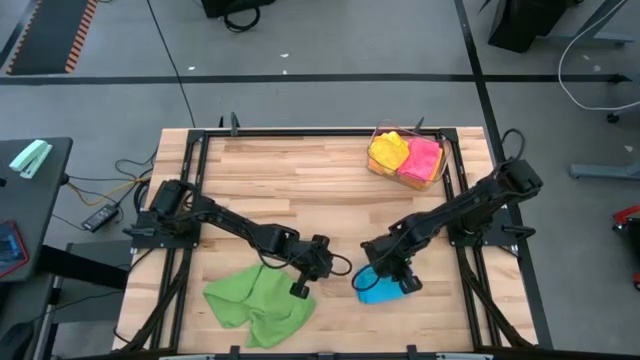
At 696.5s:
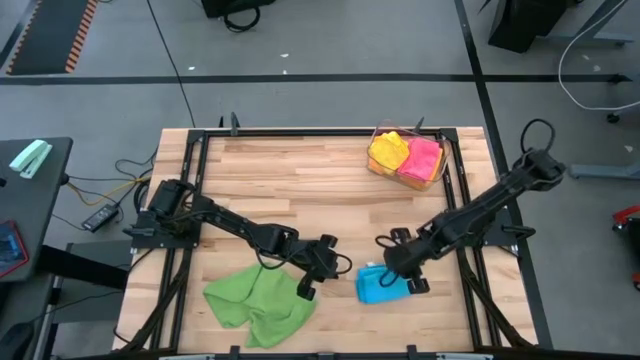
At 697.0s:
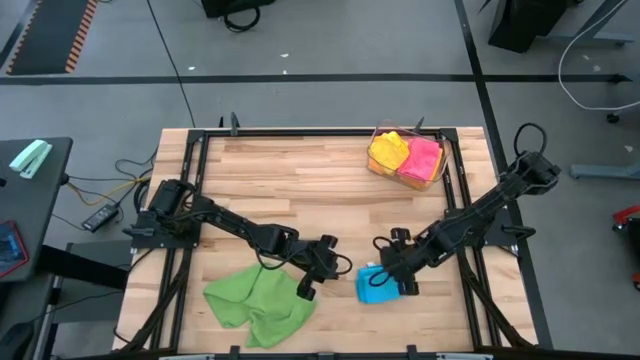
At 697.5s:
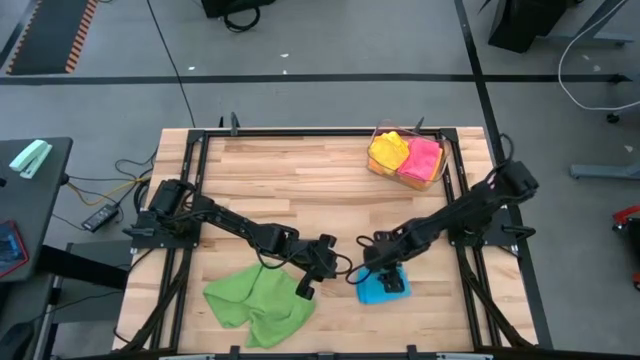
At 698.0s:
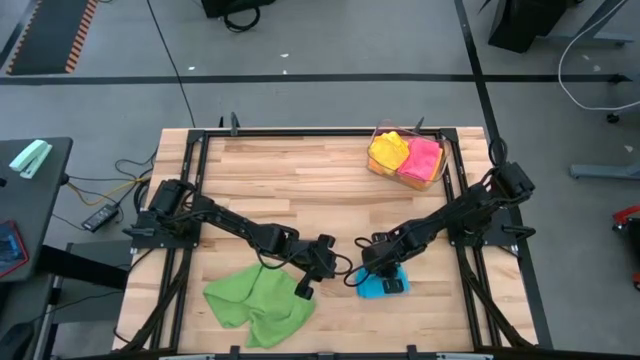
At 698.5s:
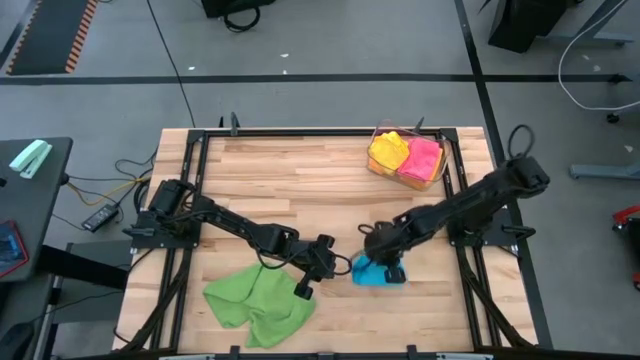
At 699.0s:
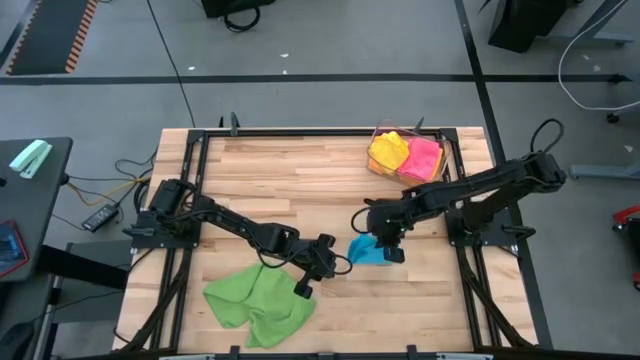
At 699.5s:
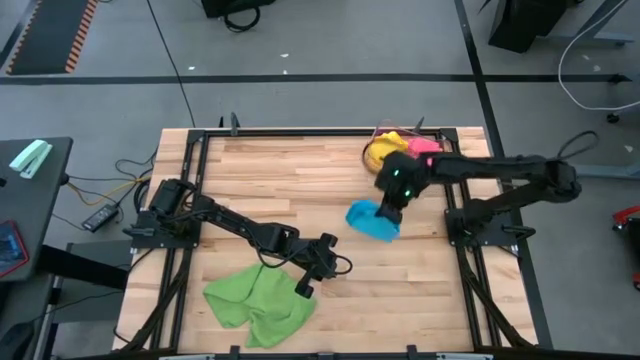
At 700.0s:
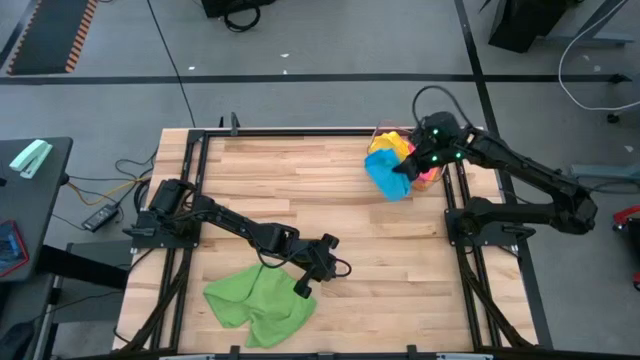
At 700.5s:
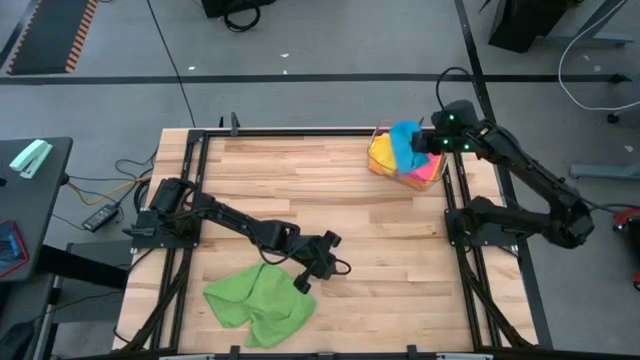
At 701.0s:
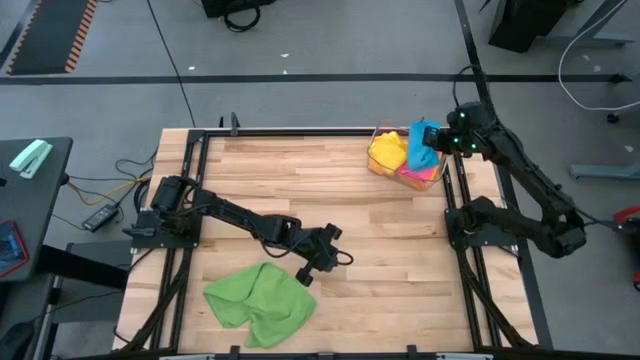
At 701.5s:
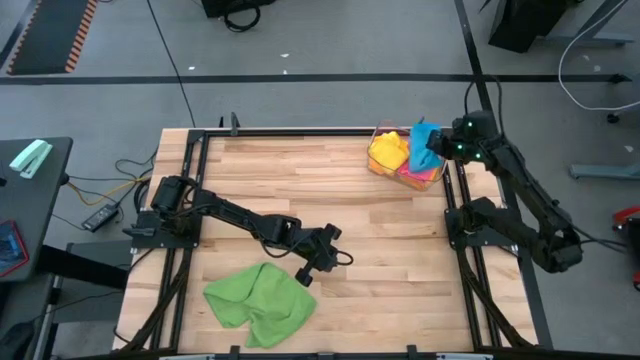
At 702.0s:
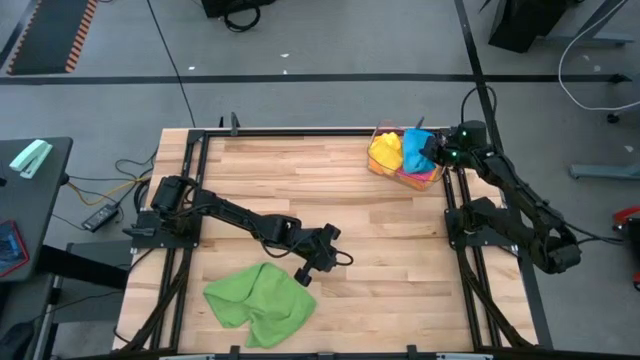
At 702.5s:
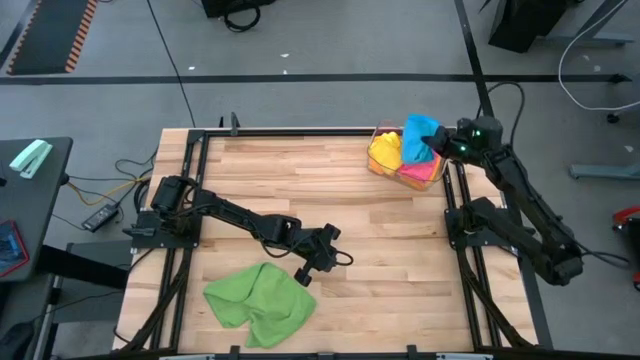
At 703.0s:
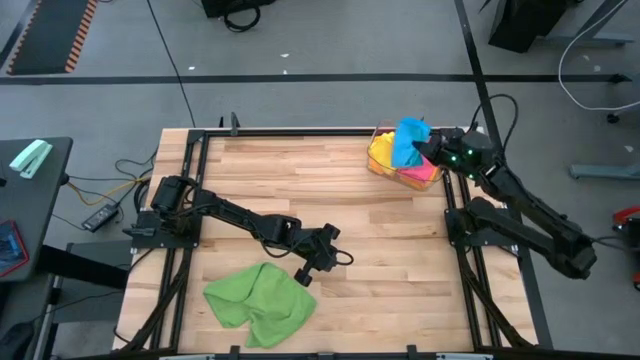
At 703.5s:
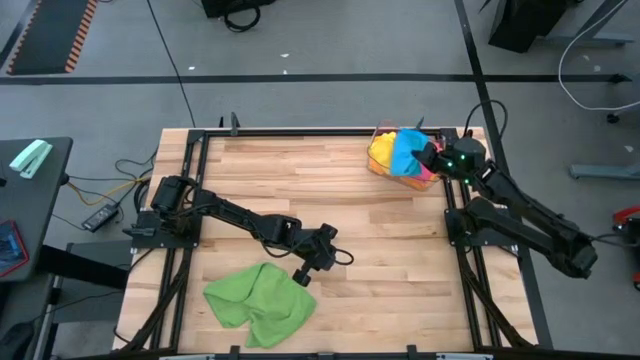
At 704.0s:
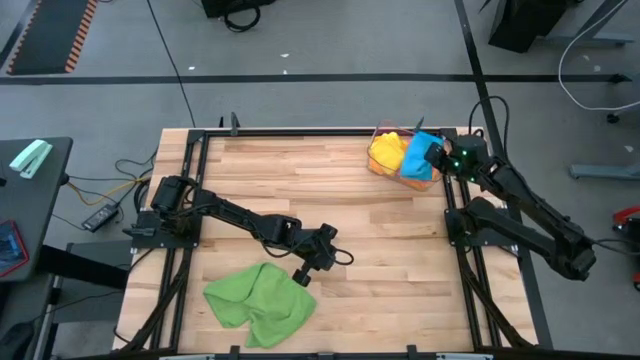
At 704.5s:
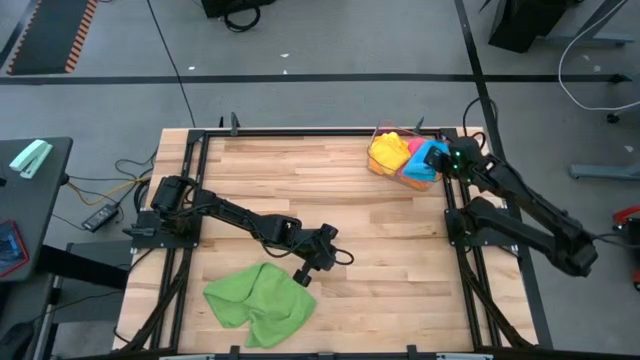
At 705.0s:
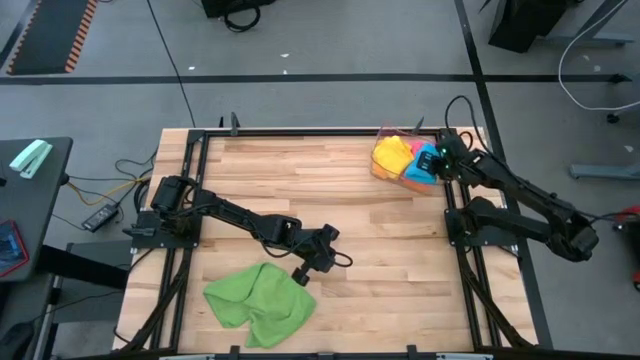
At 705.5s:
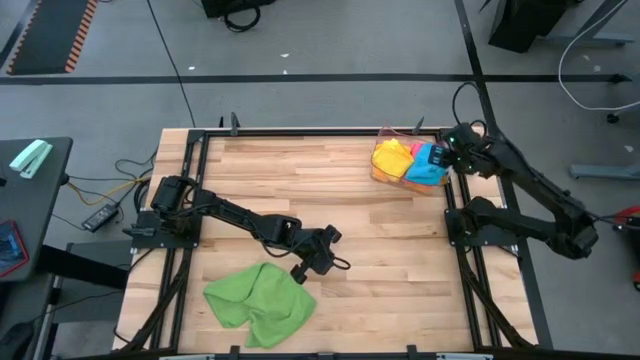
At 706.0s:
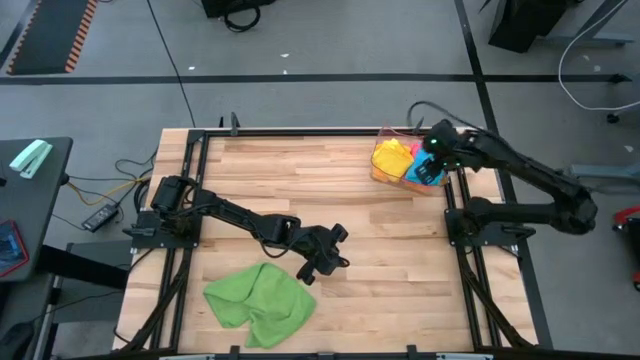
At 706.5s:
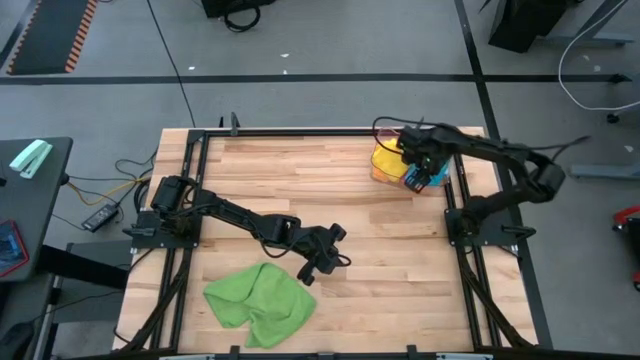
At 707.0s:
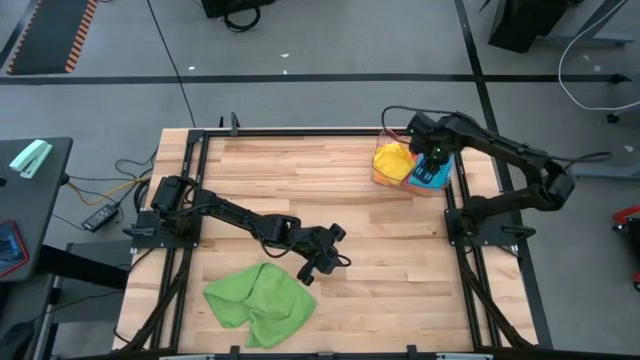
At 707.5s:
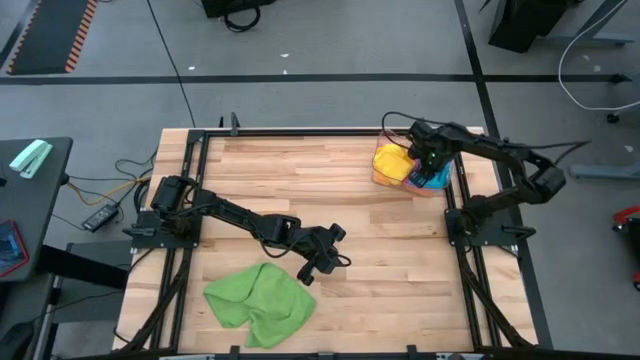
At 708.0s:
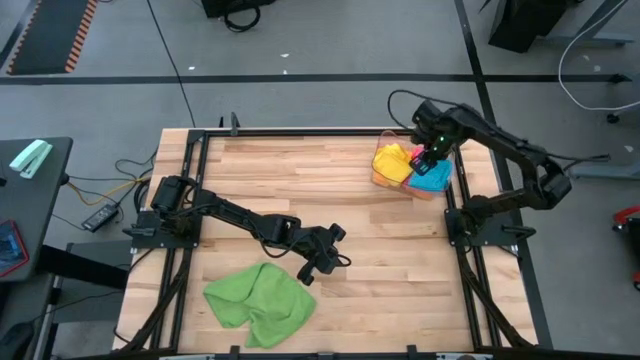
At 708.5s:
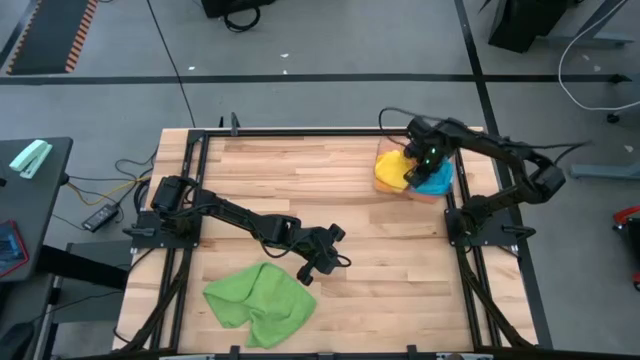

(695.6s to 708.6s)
Task: Fold microfiber towels
Stack the folded blue microfiber cloth on top of the folded pink microfiber cloth

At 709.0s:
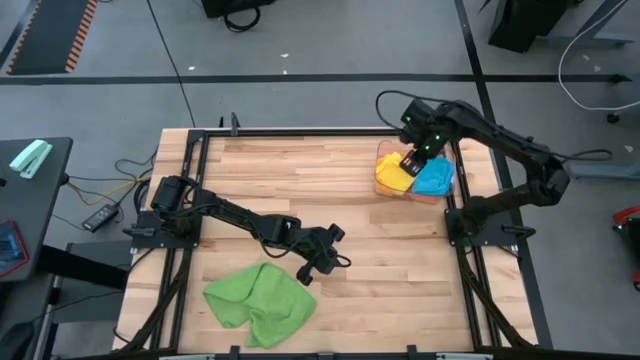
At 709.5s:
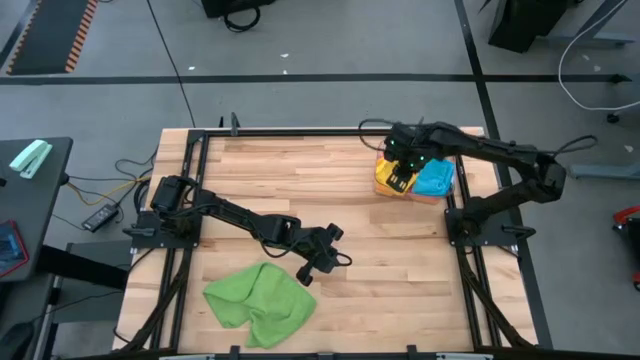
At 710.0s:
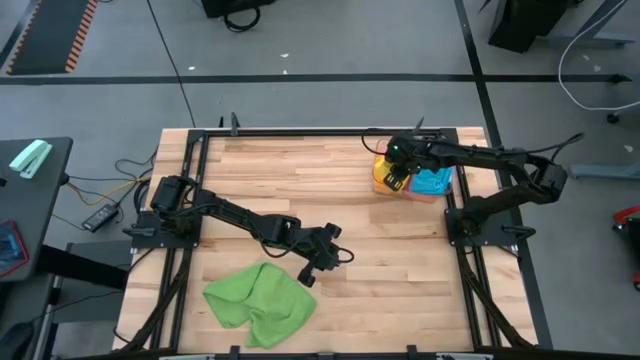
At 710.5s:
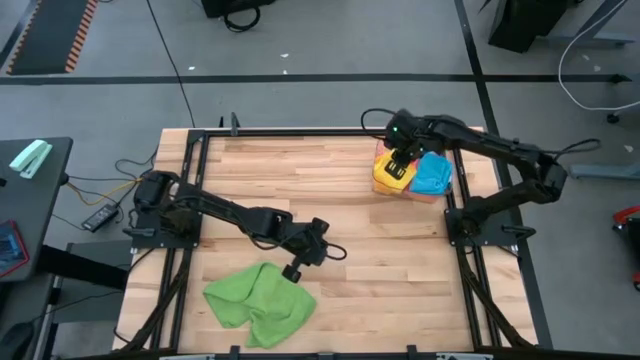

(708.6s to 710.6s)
Adjust the folded yellow microfiber cloth in the transparent bin

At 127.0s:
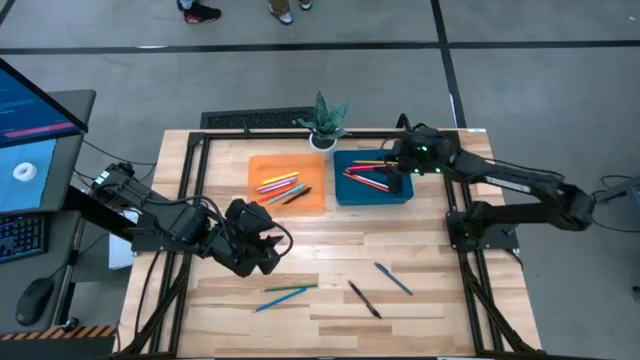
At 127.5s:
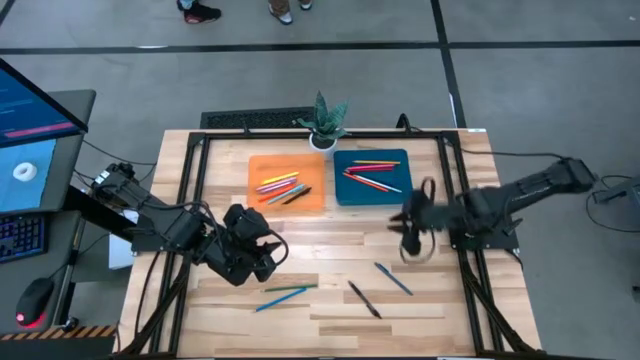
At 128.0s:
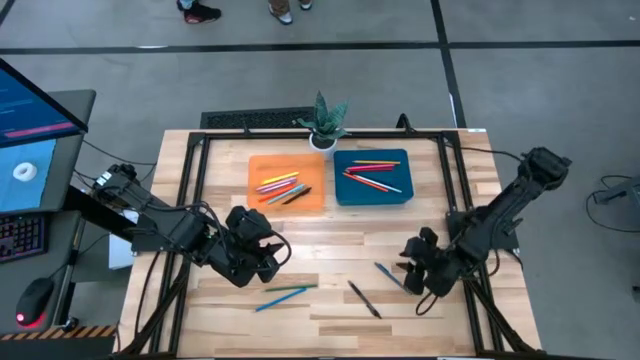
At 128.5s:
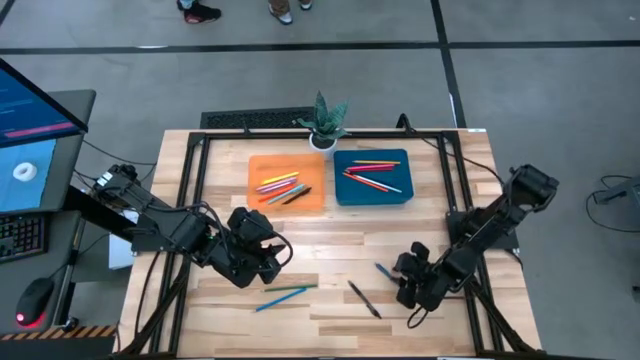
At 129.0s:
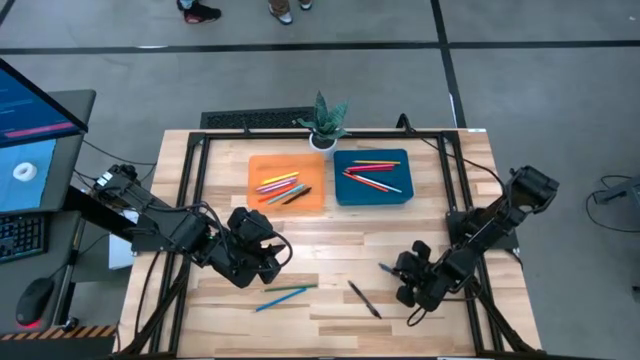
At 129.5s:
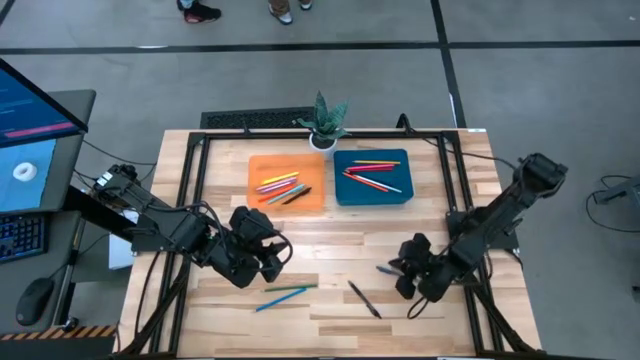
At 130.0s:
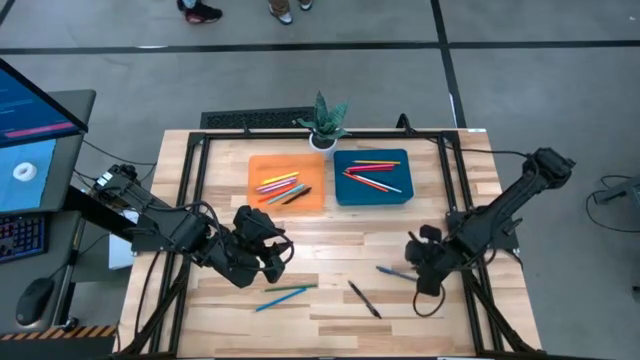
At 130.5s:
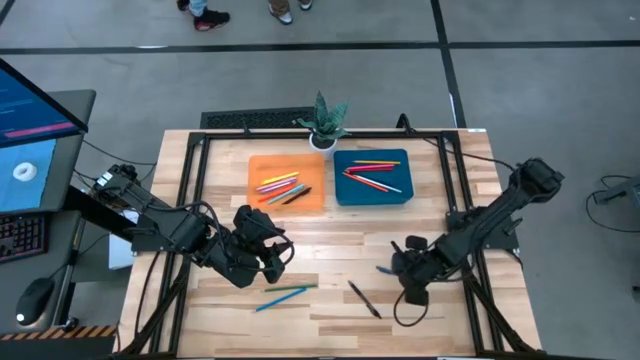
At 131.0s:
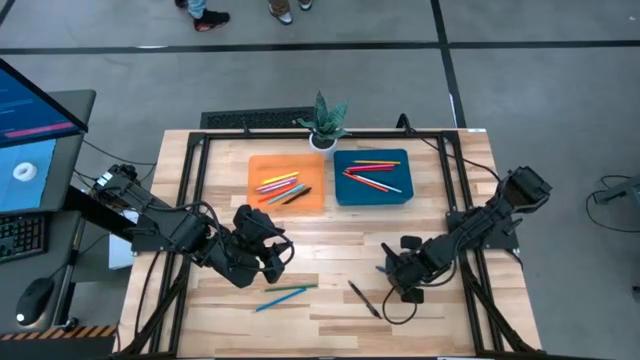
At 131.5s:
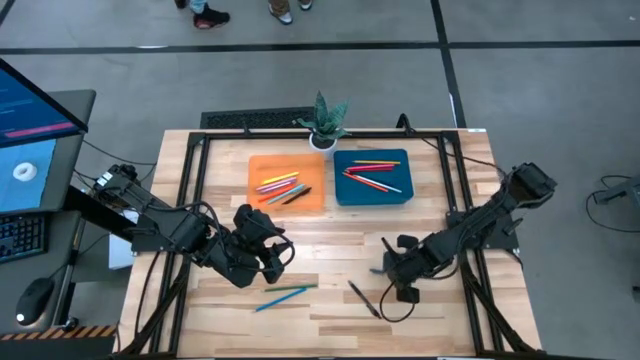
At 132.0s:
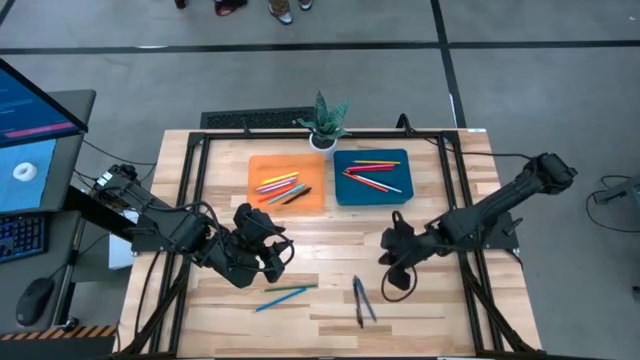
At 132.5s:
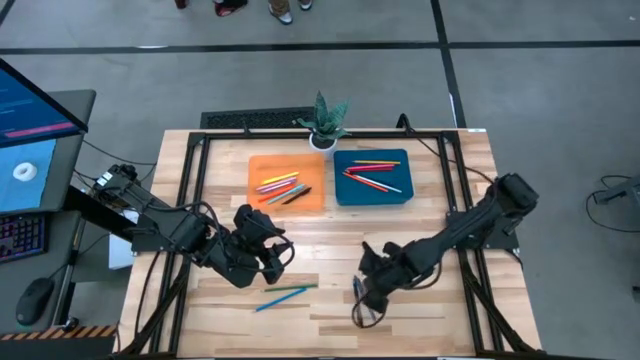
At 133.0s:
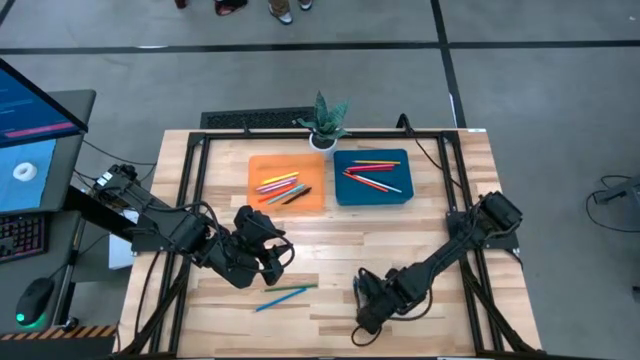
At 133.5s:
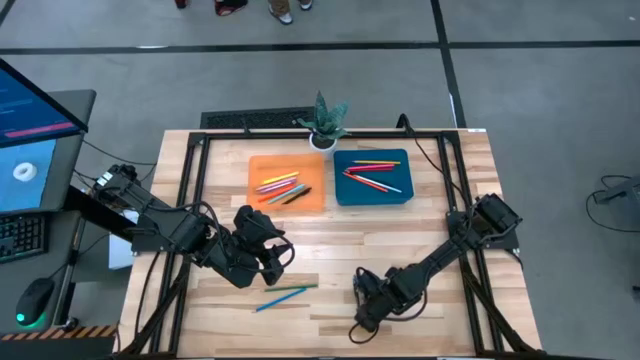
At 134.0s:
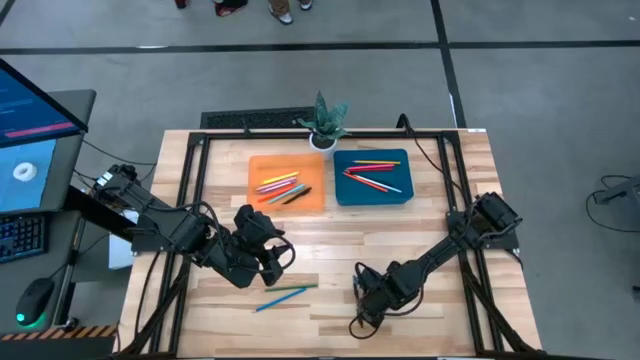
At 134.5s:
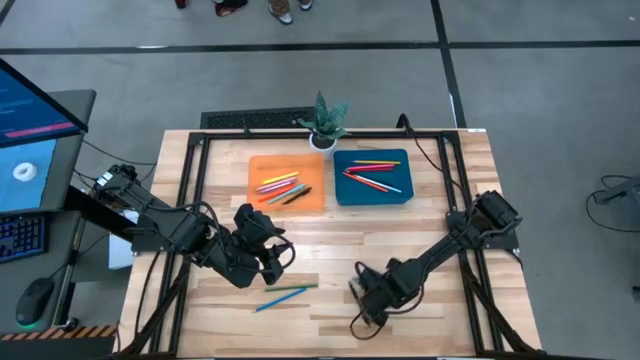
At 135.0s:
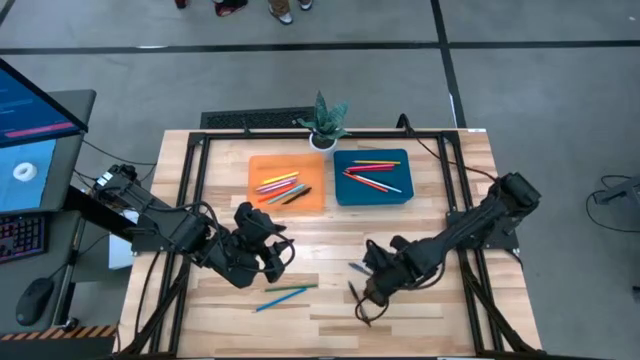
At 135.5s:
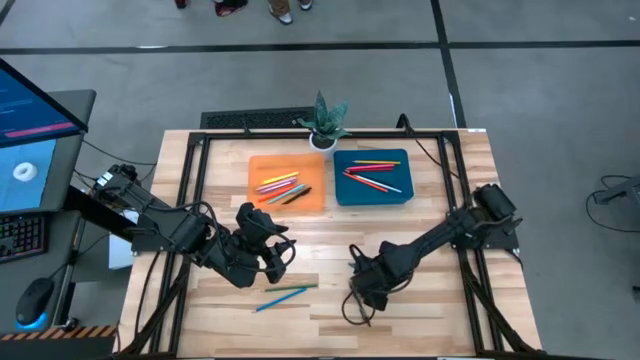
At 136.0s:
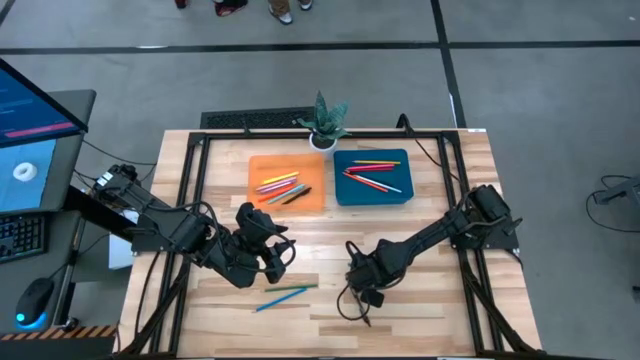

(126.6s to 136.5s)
Task: Sort pens & pencils
Put the blue pen into the orange bin
